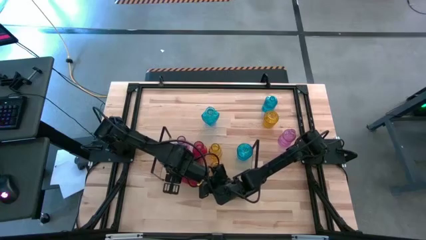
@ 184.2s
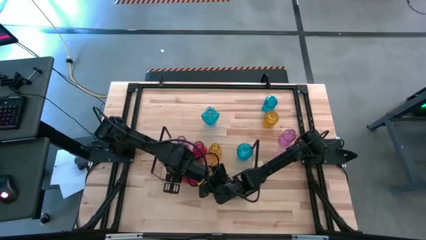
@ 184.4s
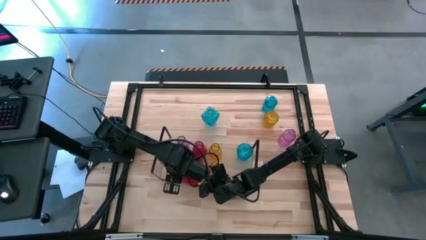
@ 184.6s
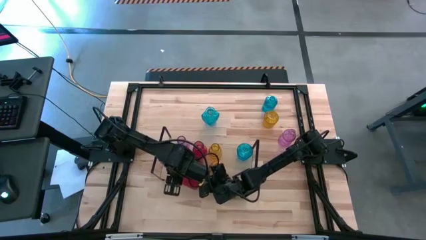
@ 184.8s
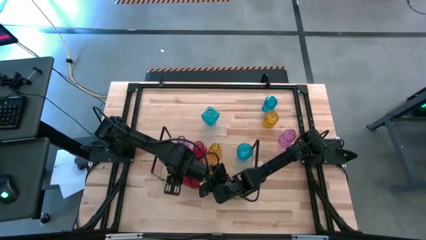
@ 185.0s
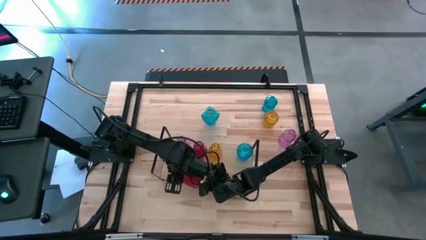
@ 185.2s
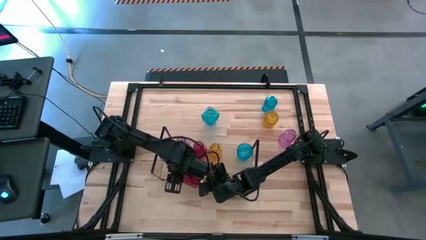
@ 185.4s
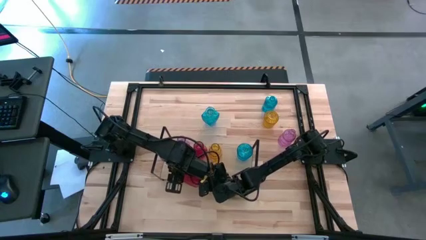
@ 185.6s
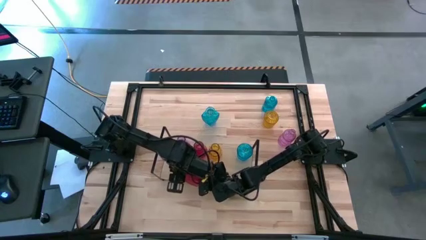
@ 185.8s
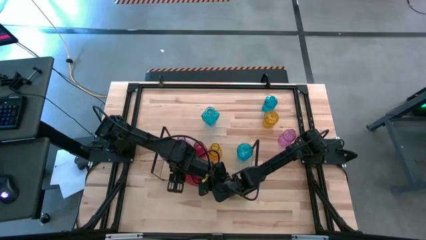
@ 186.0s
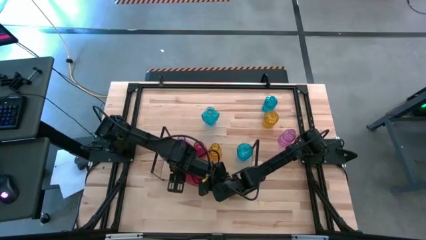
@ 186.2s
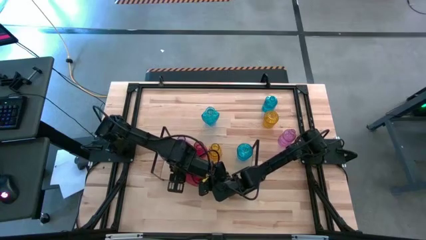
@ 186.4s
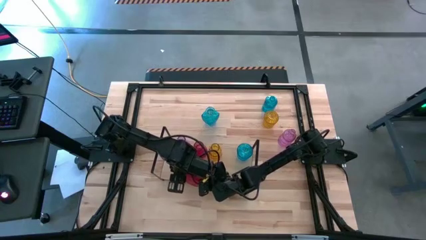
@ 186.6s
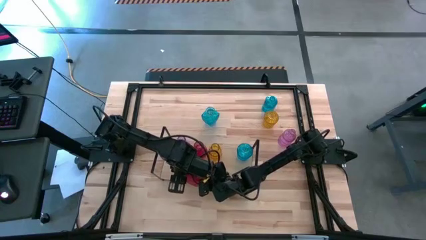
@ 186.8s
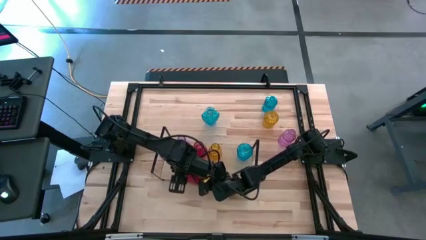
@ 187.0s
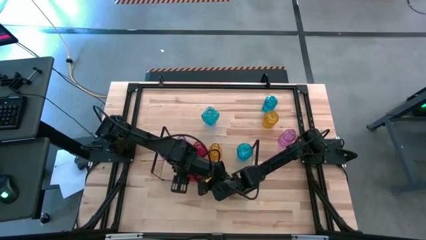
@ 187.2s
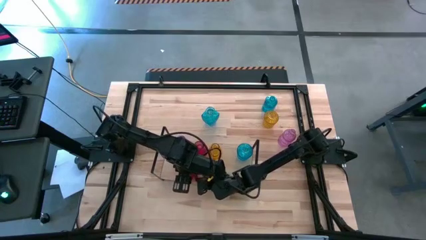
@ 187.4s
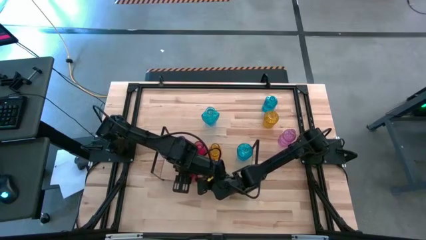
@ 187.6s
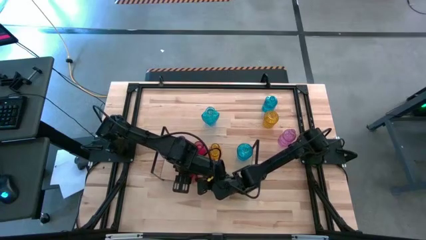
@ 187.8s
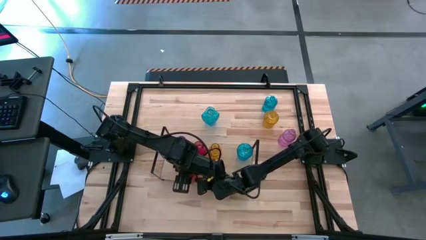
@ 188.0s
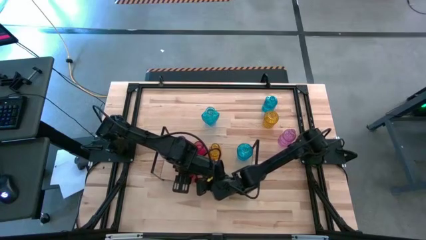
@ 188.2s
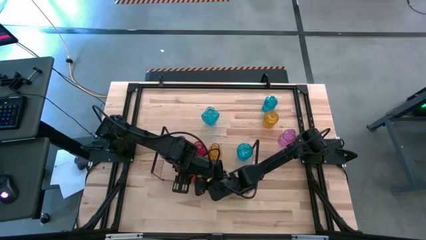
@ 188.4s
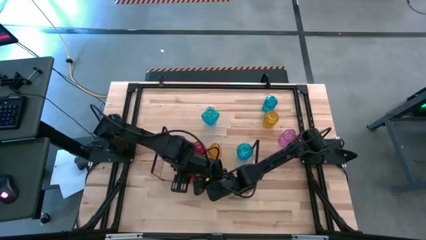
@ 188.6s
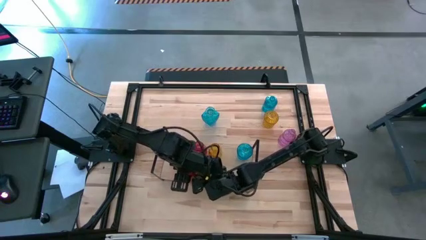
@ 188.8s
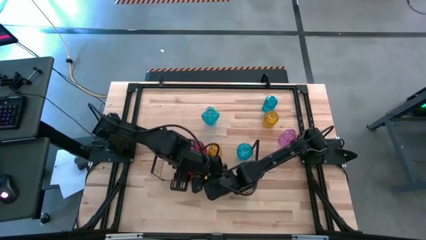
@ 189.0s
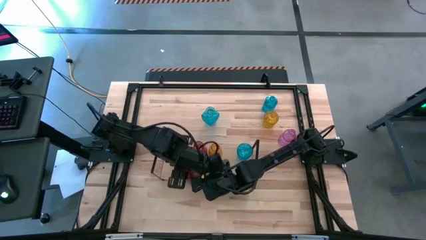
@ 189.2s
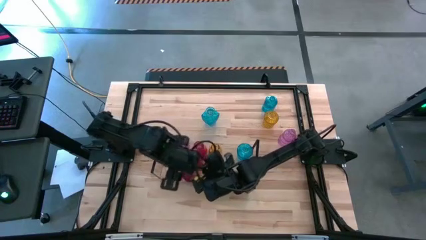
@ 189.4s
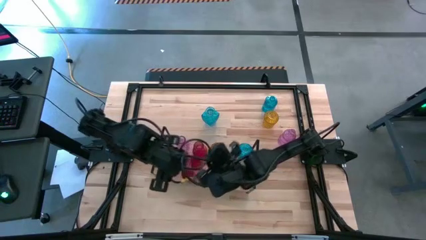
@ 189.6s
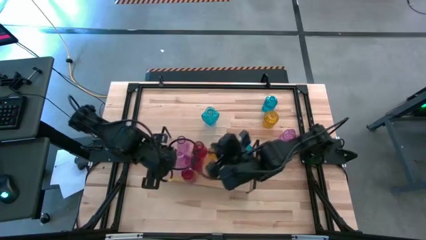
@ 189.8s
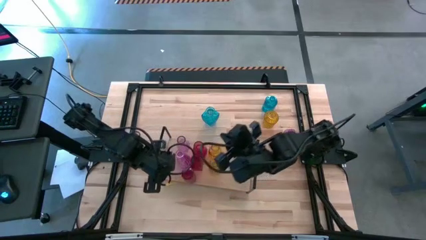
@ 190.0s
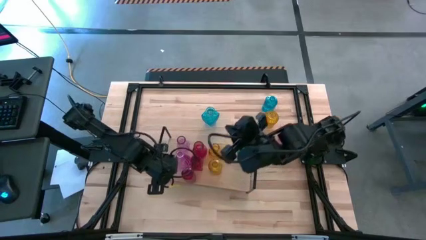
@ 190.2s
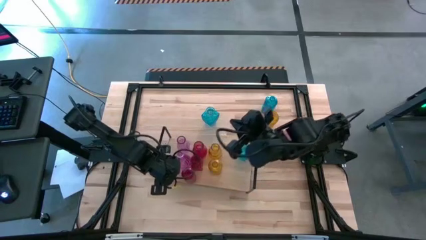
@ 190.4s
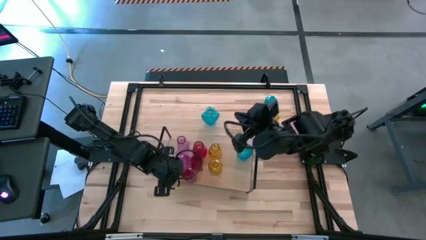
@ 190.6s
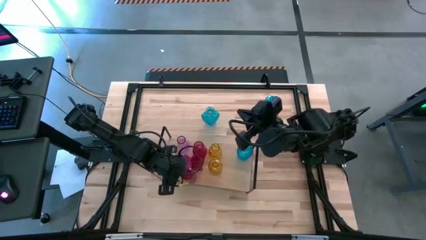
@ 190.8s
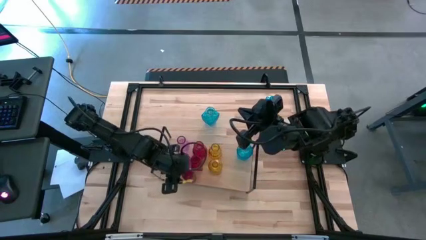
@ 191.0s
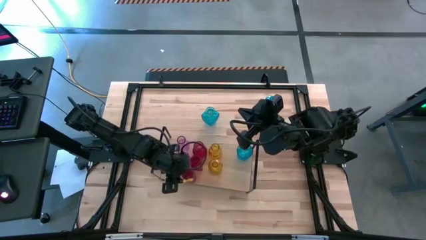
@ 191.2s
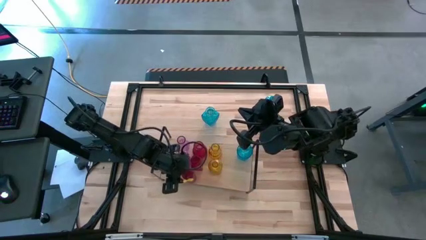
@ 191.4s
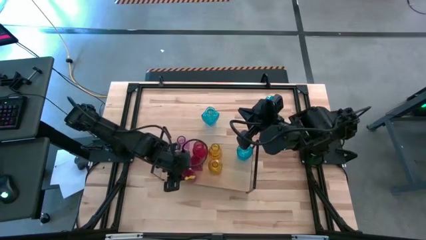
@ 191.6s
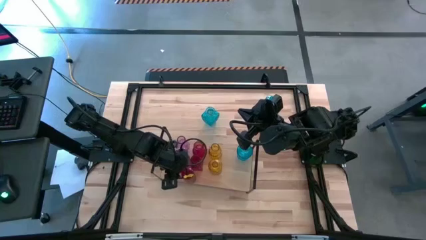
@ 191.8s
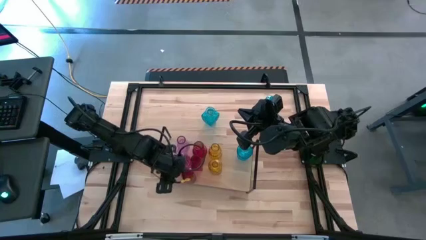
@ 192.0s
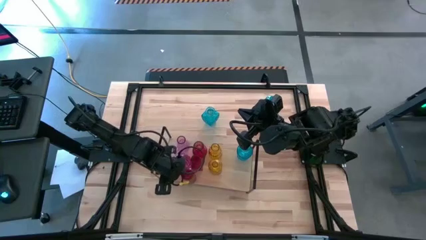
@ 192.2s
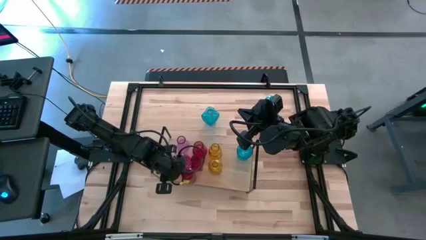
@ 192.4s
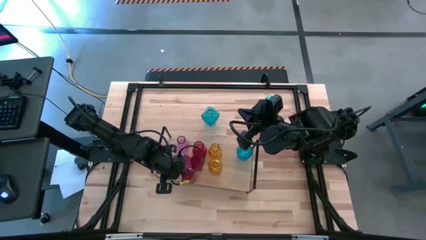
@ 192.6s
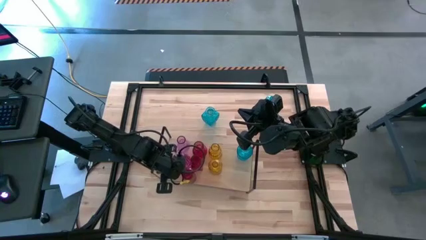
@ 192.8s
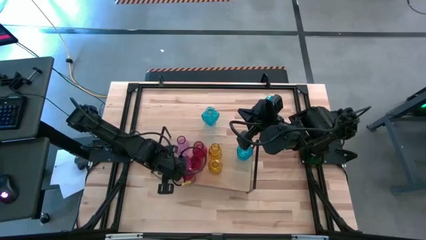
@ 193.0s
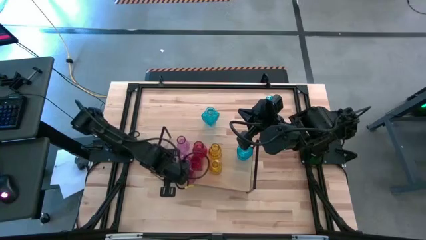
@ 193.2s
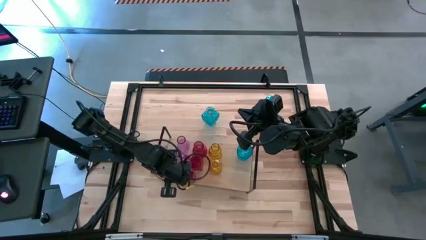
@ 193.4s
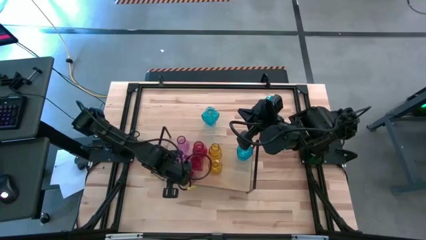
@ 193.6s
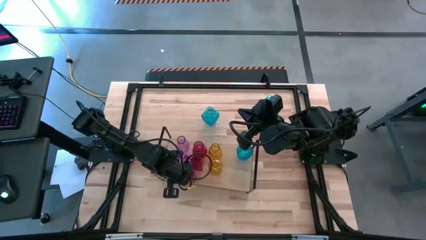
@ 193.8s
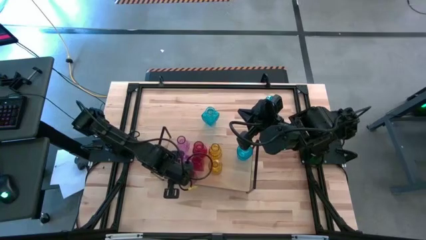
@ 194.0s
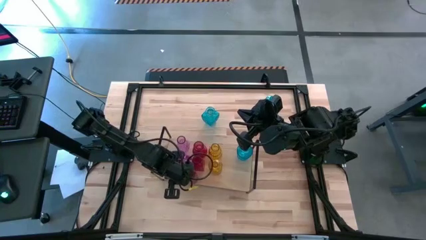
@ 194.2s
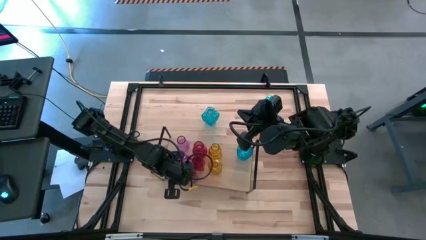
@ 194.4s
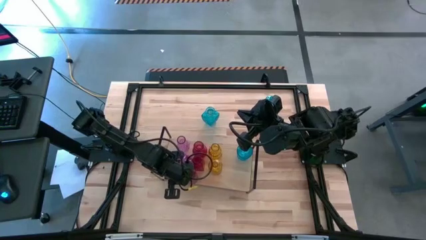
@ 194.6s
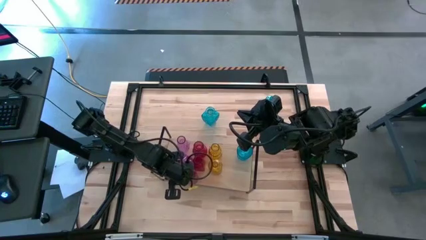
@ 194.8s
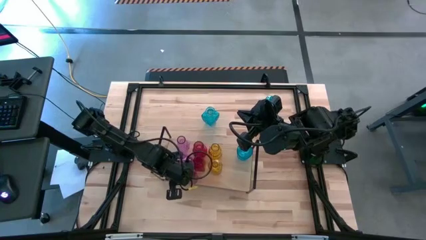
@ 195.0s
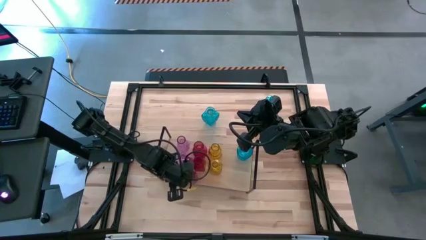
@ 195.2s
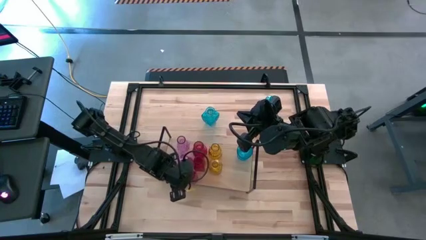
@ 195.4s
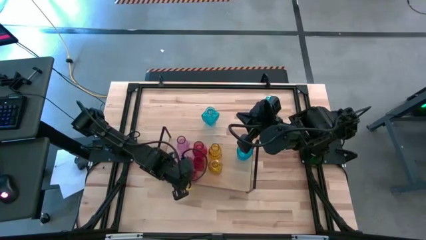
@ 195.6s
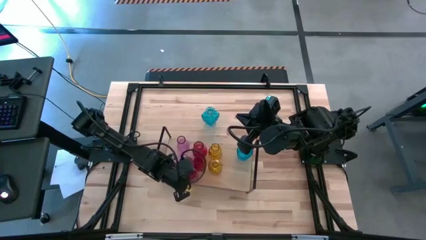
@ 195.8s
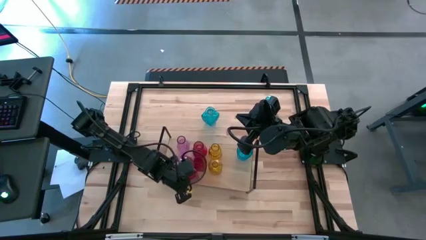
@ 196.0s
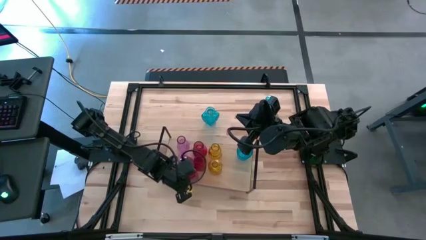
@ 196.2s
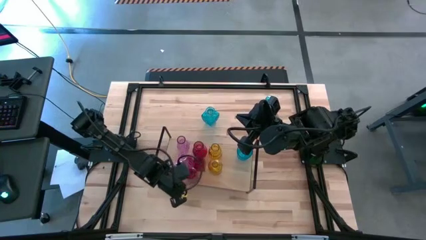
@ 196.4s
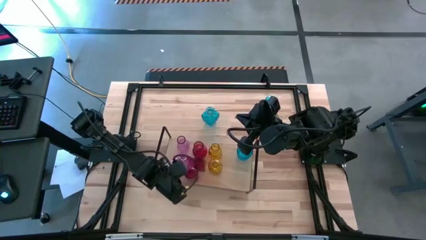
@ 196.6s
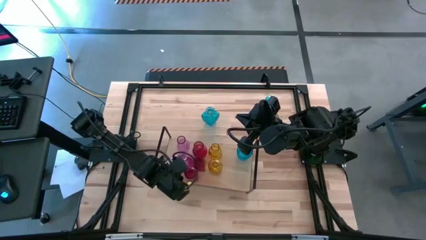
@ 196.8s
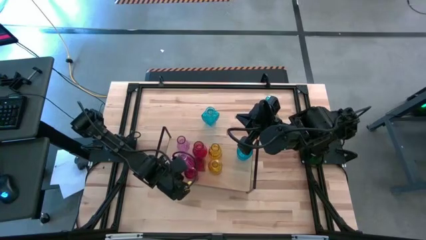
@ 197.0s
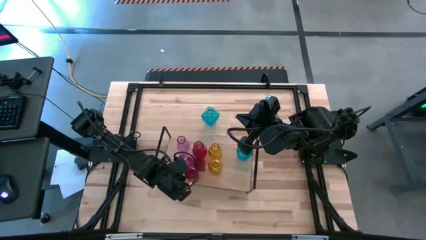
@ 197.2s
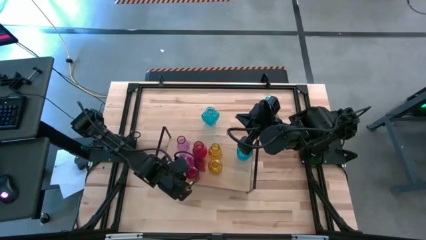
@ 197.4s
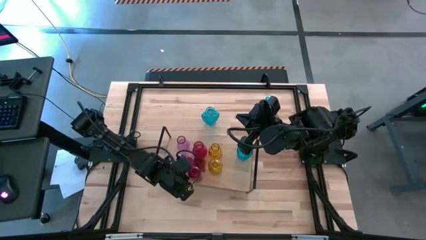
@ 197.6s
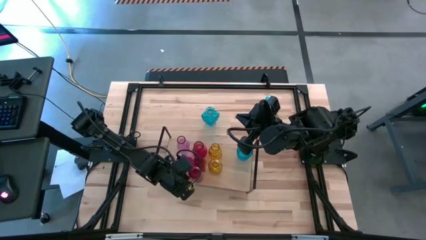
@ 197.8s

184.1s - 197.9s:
Task: sort vases onto shelf
Put the red vase on the shelf aligned with the other red vases

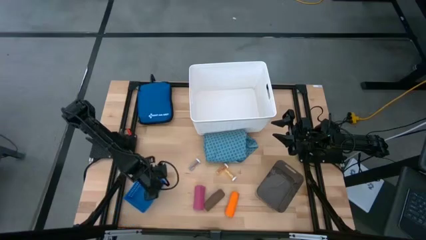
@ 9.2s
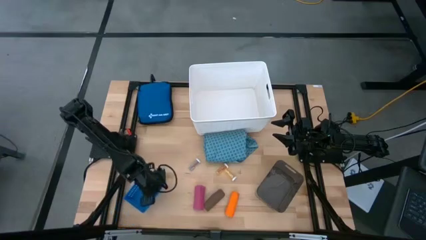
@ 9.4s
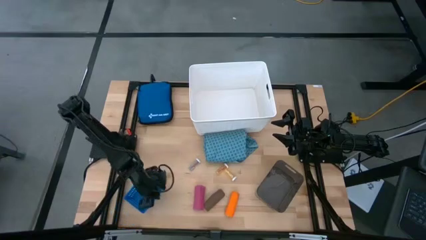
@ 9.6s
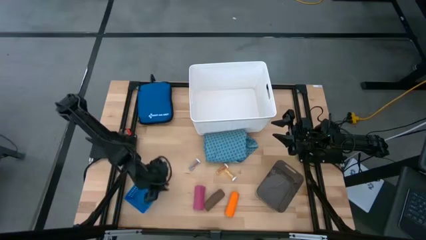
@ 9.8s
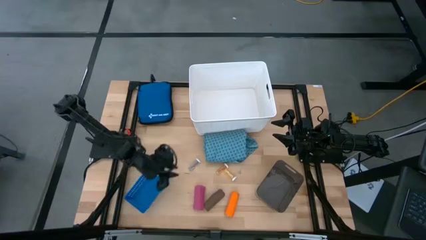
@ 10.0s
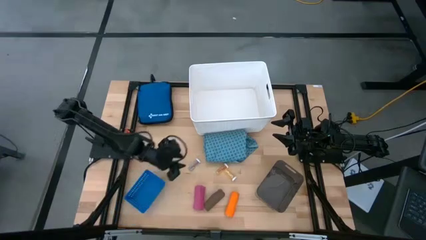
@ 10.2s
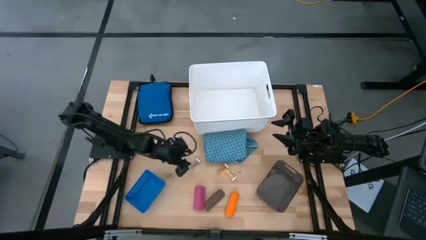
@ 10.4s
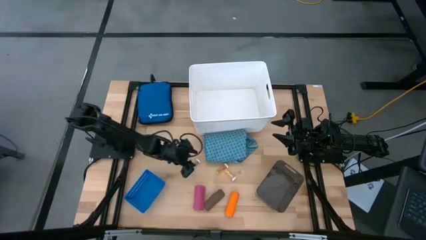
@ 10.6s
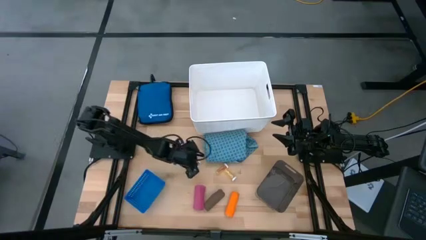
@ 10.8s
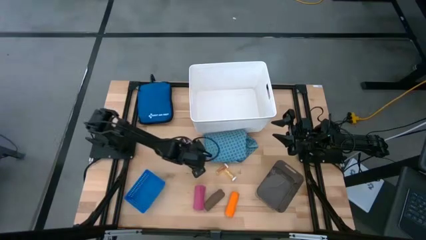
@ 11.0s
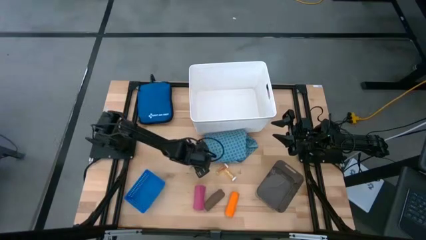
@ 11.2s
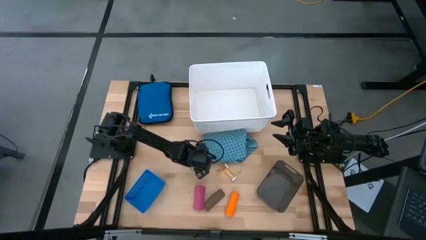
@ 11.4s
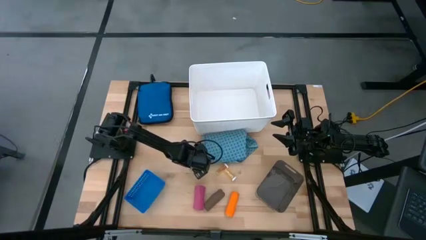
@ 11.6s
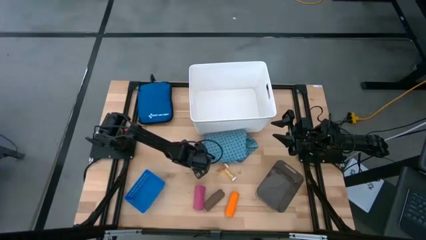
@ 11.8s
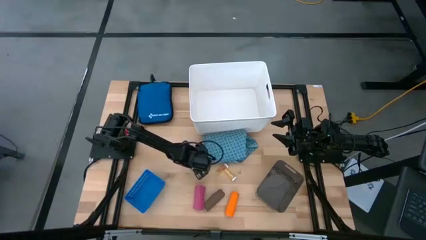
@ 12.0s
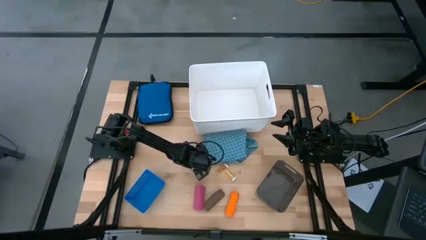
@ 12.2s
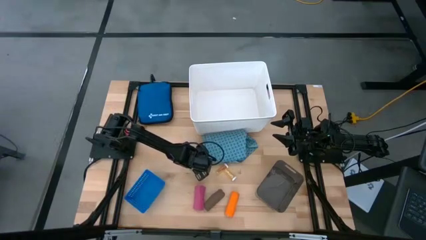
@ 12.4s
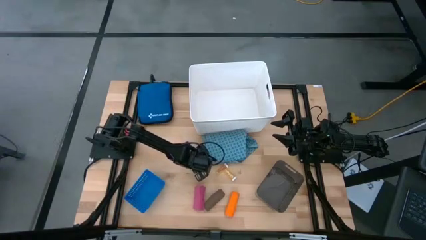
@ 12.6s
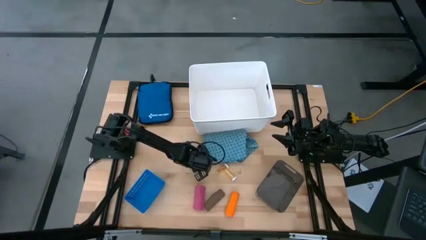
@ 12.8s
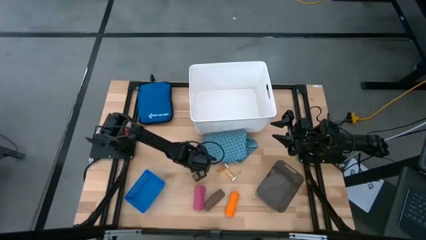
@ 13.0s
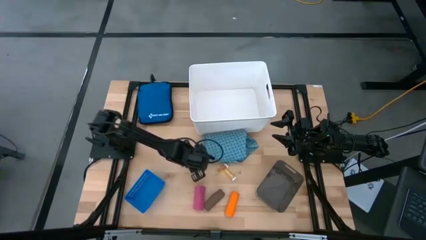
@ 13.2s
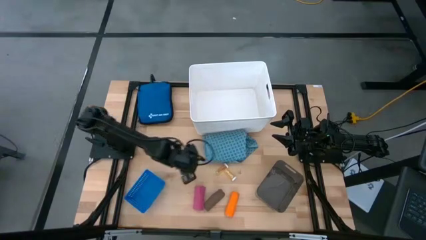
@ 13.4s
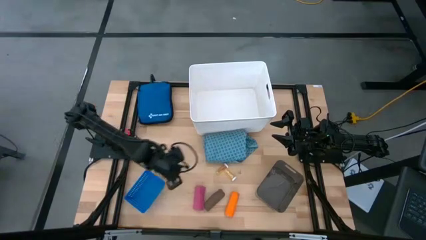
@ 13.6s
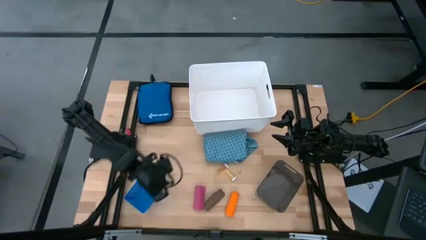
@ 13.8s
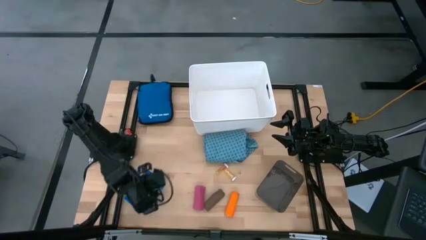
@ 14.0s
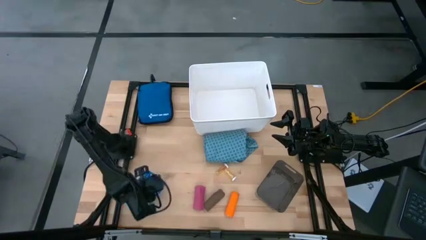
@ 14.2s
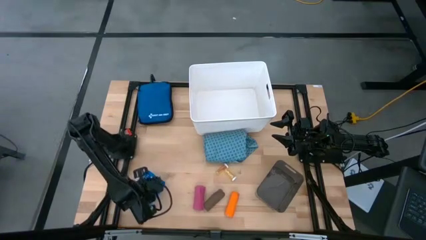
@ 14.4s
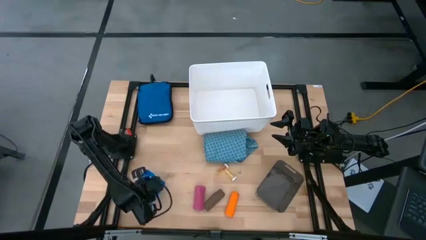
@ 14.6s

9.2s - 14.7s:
Task: Pick & Place Medicine items
Put the blue pill bottle into the blue basket
